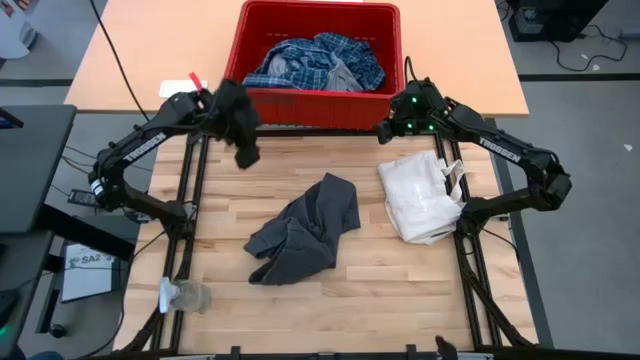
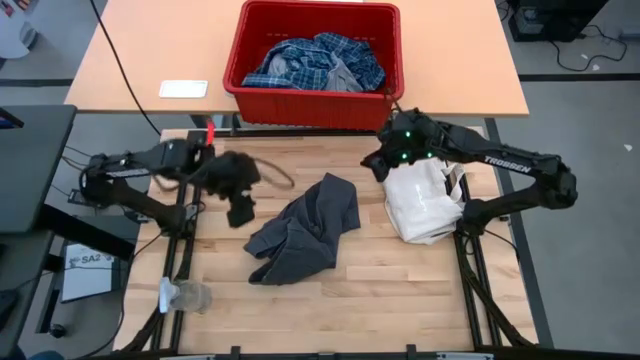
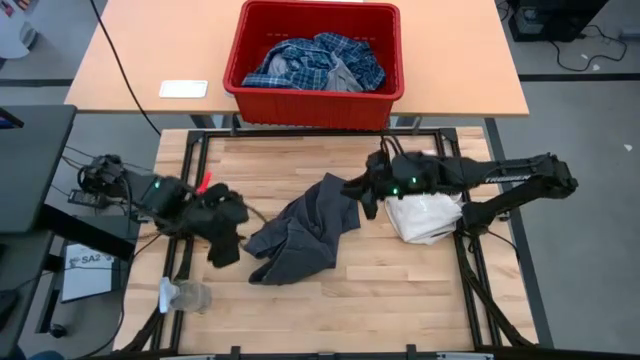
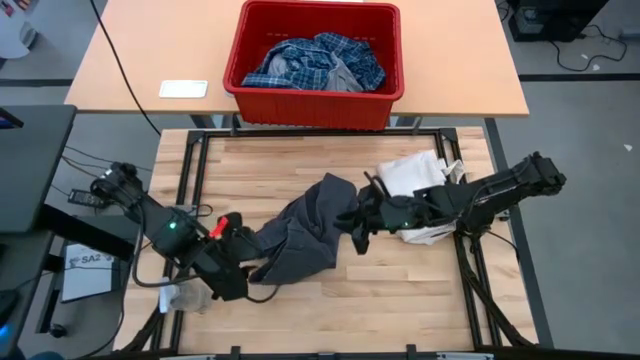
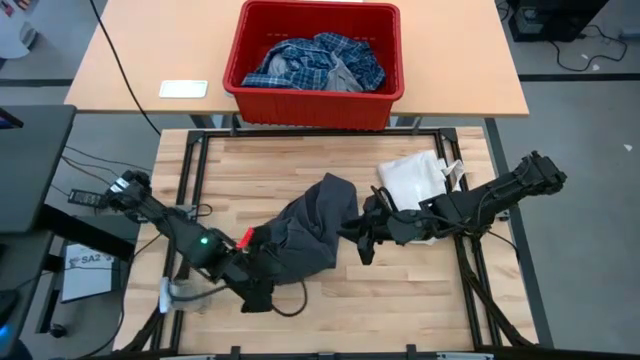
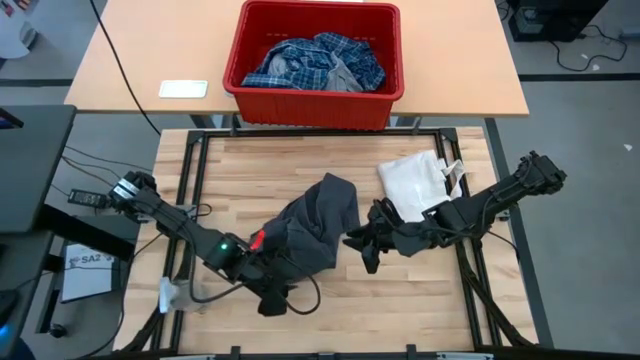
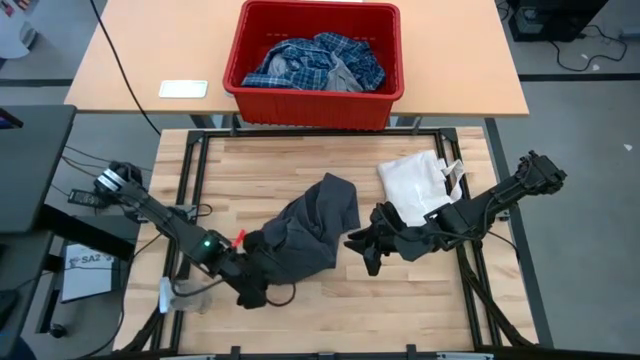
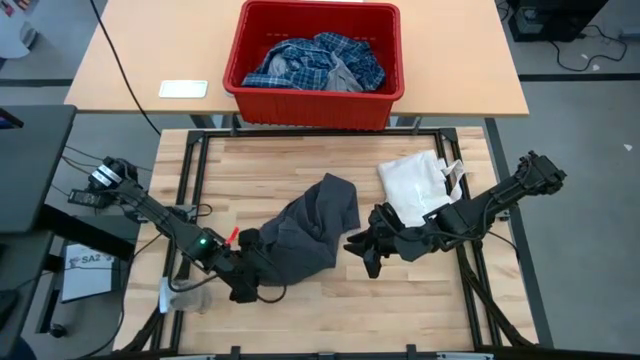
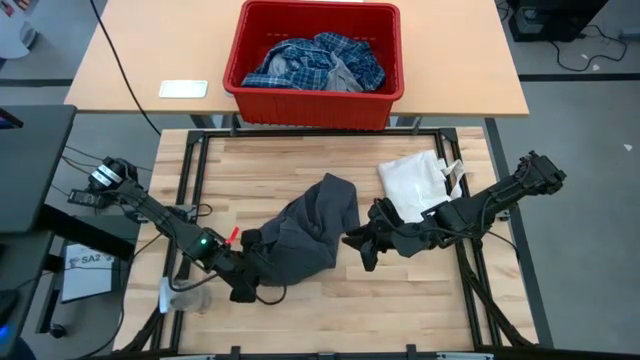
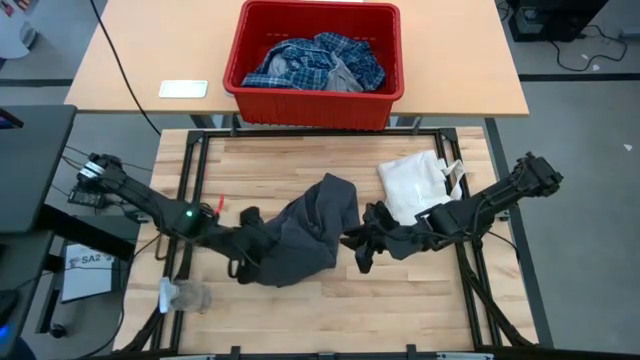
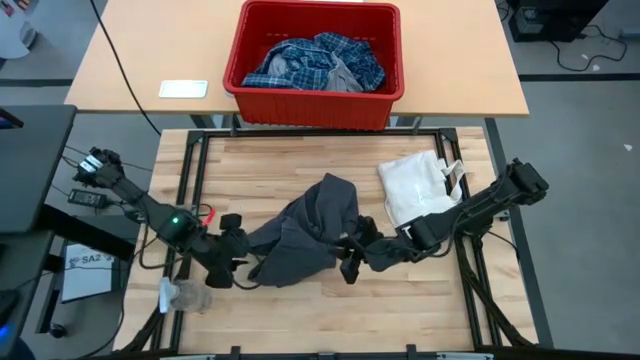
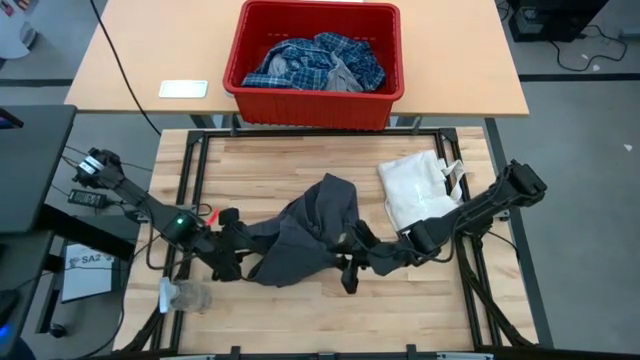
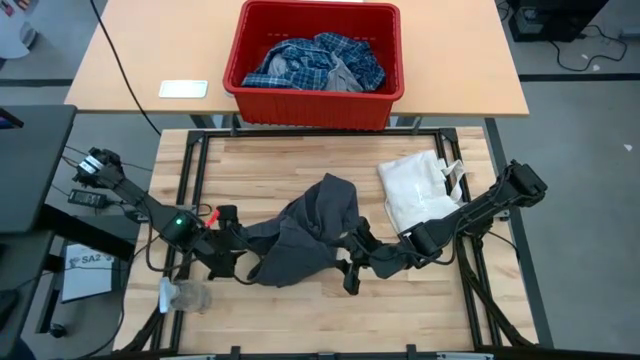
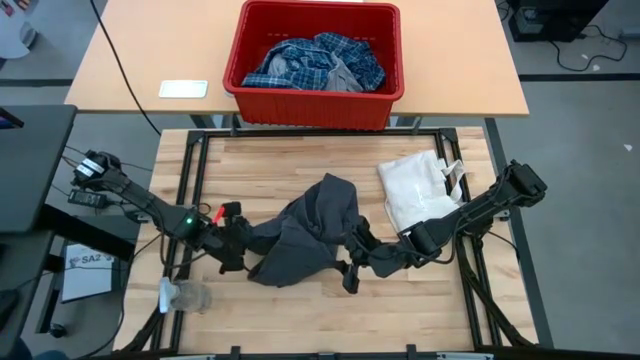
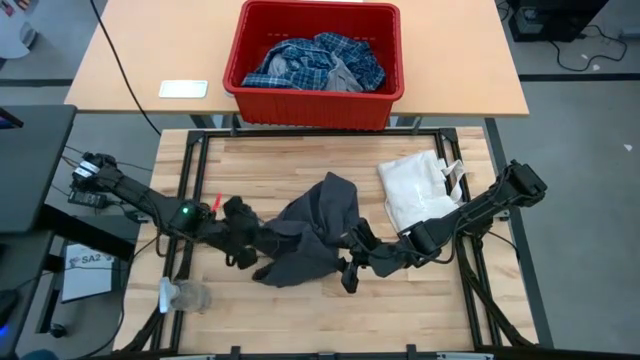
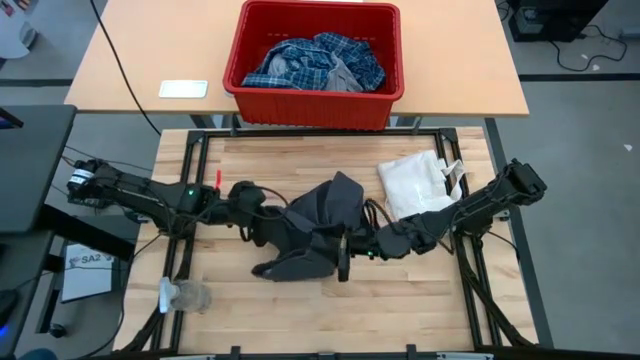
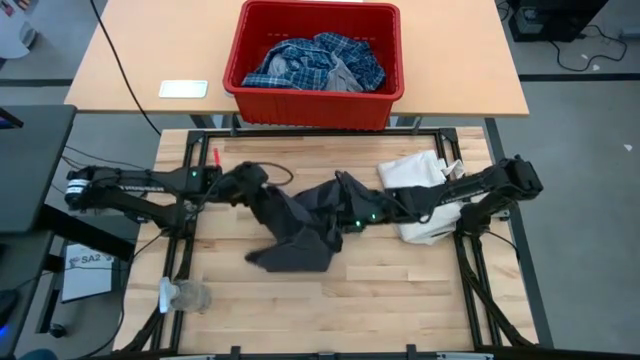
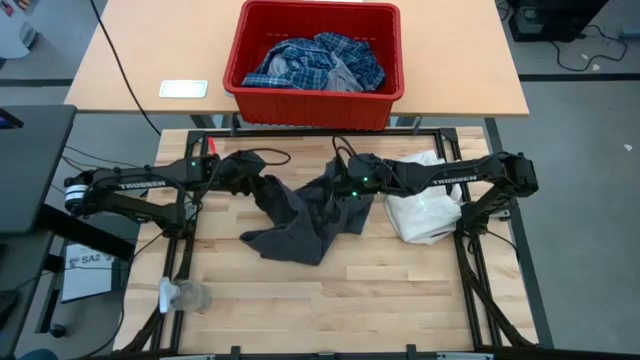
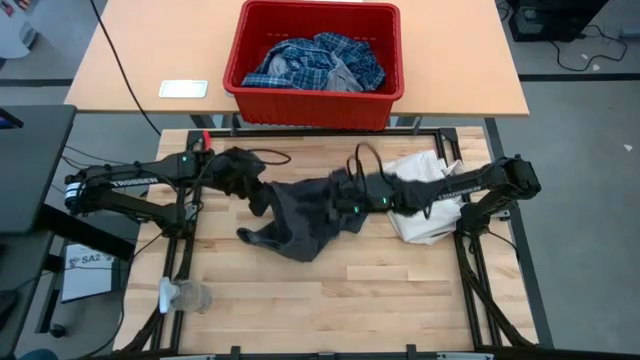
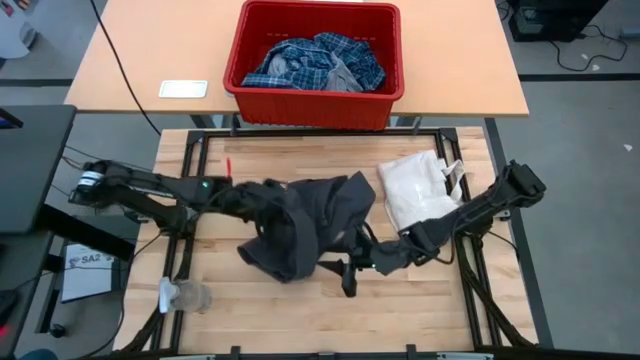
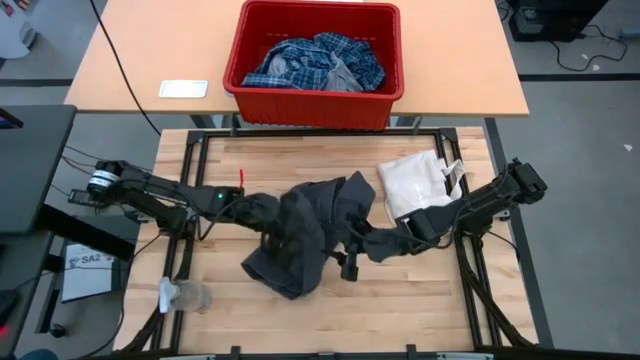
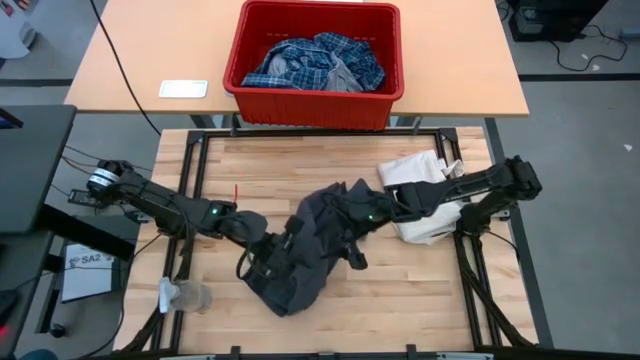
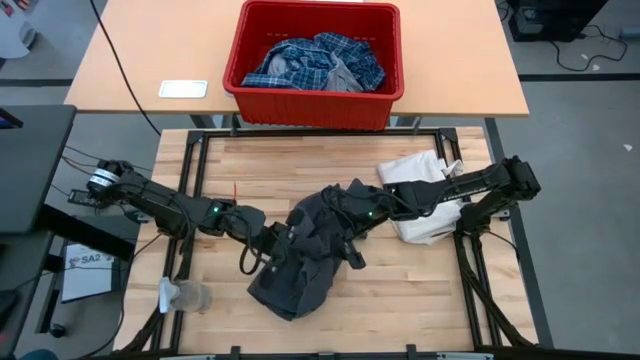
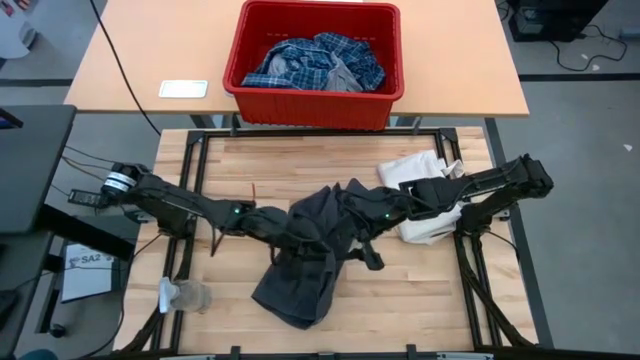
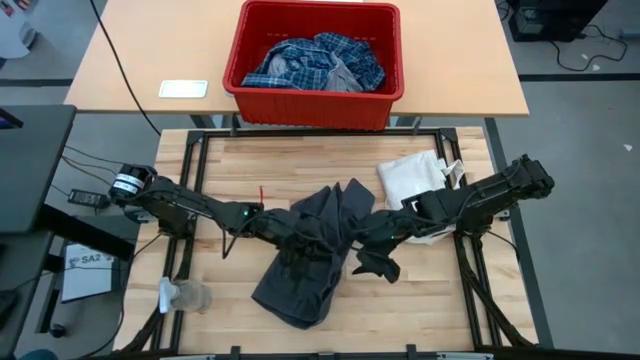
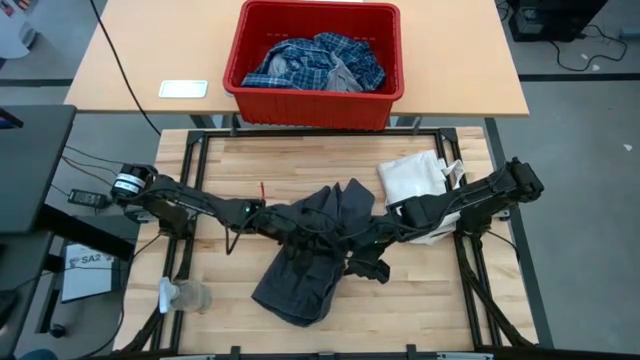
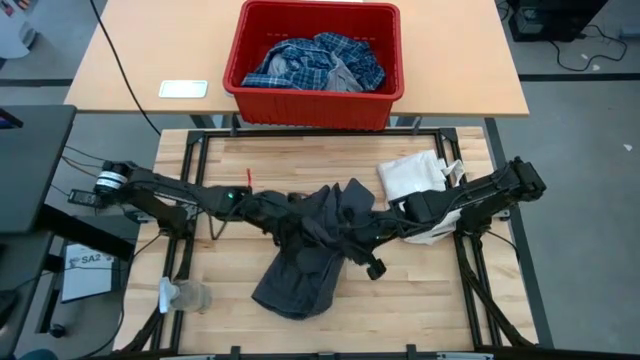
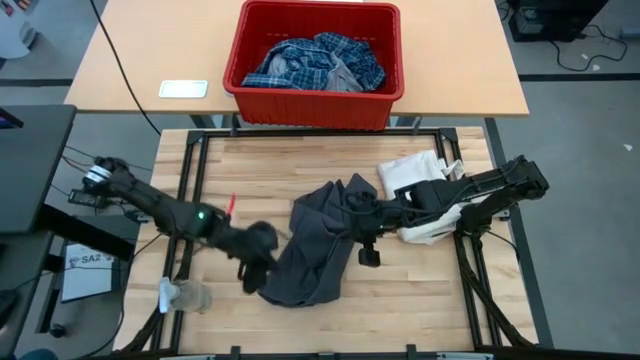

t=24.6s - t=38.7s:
Task: Fold Laundry from Bin
Fold the black shorts

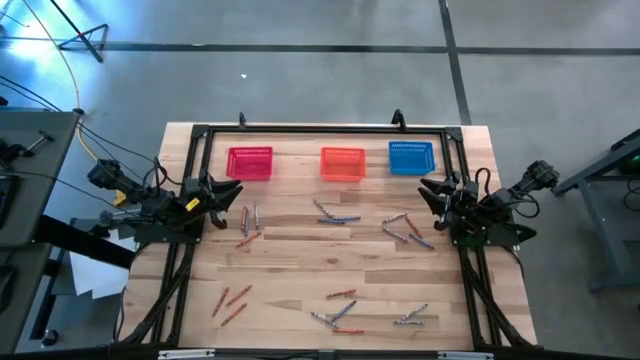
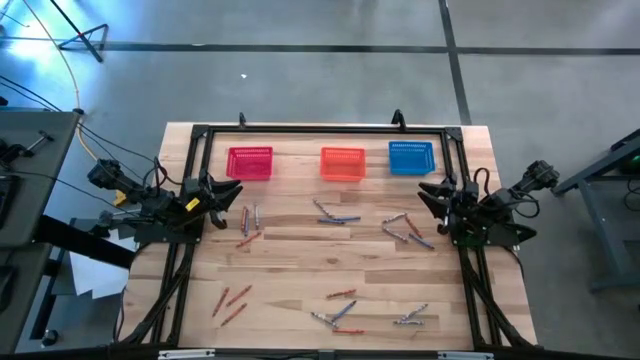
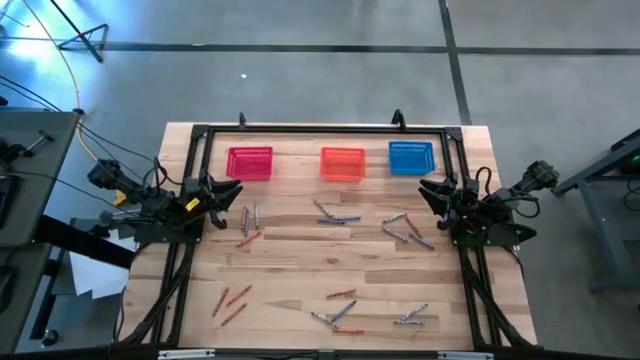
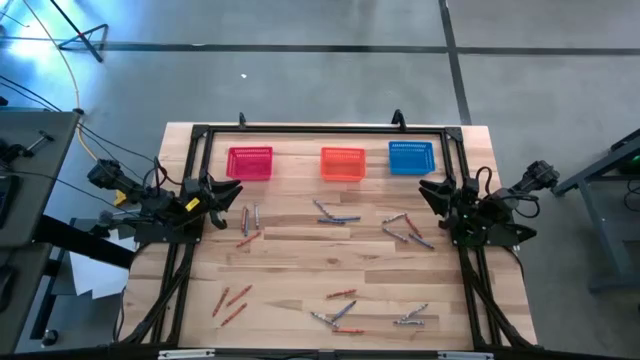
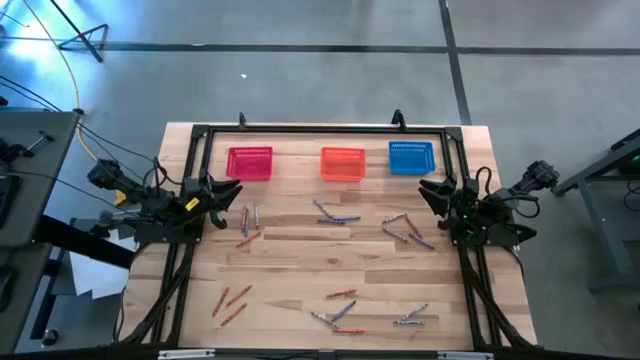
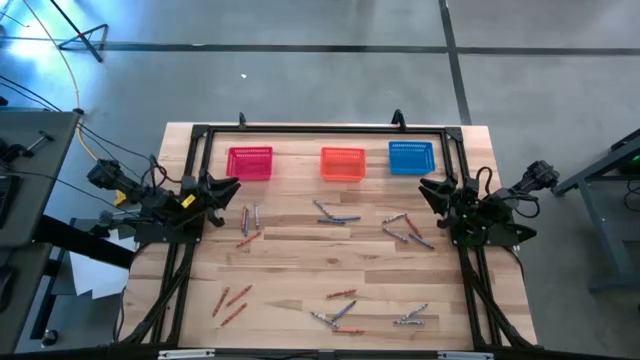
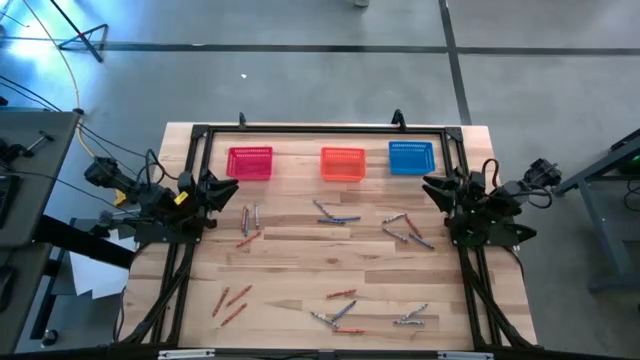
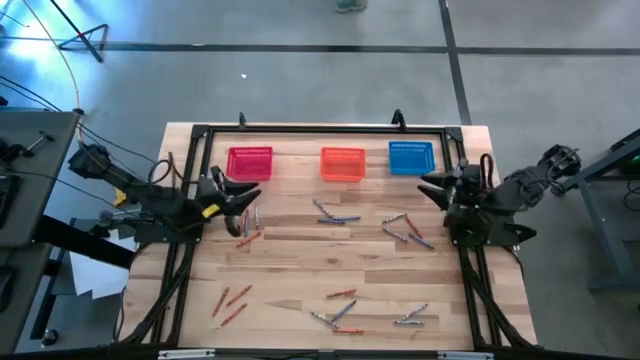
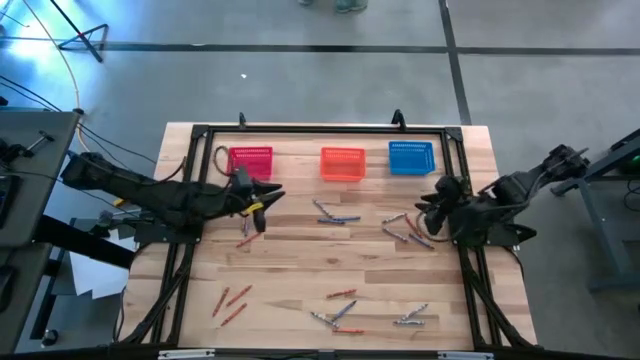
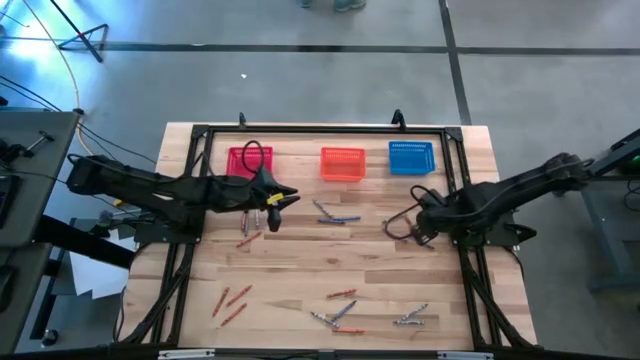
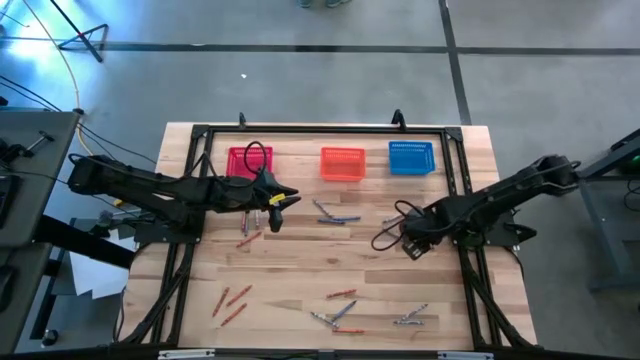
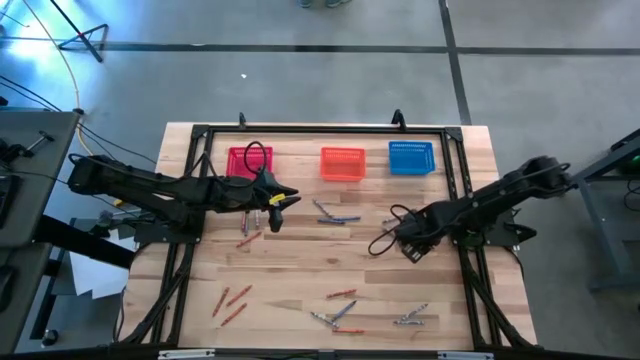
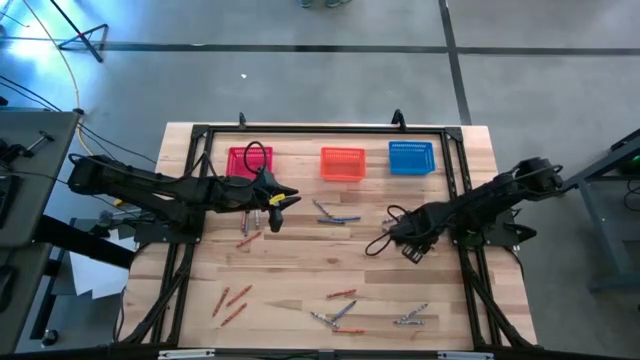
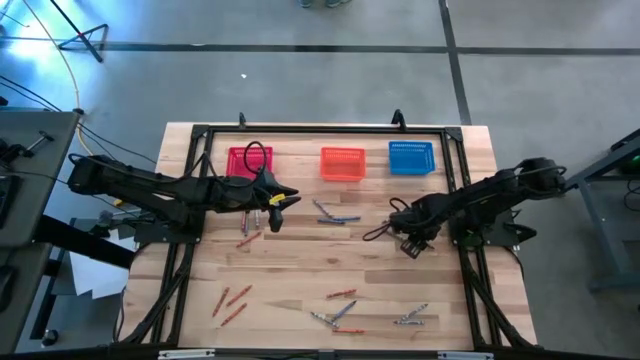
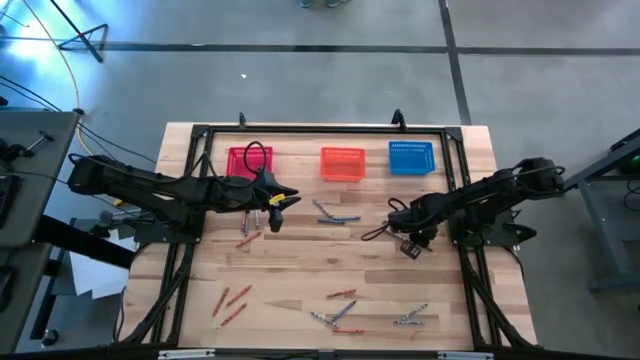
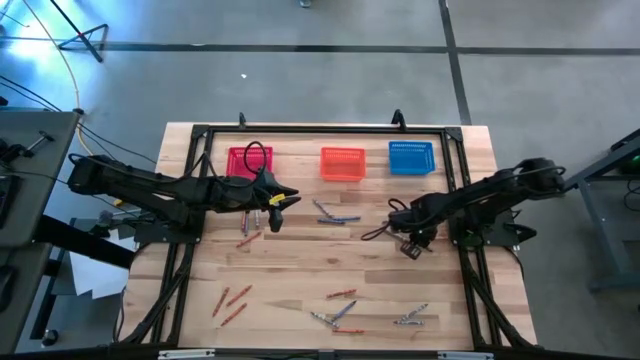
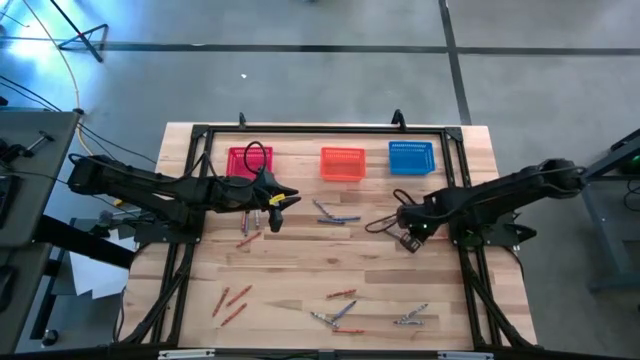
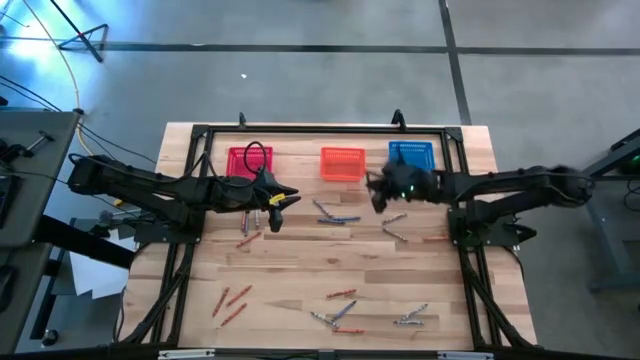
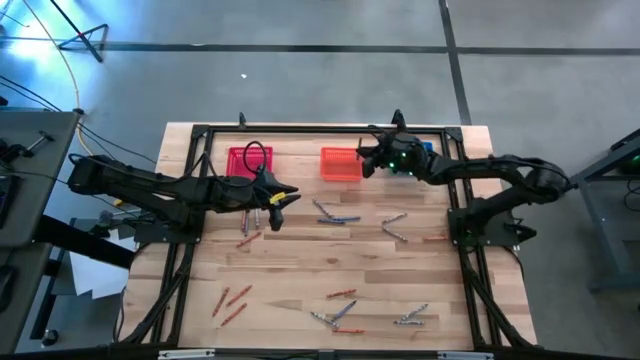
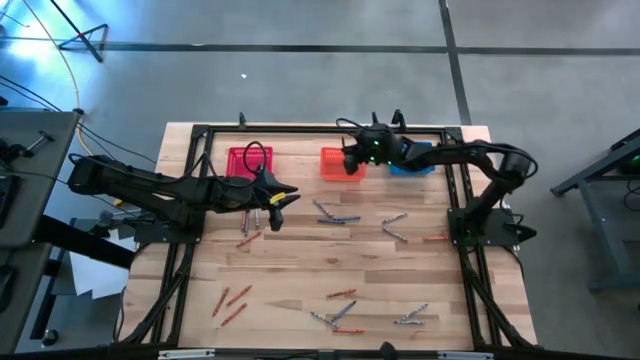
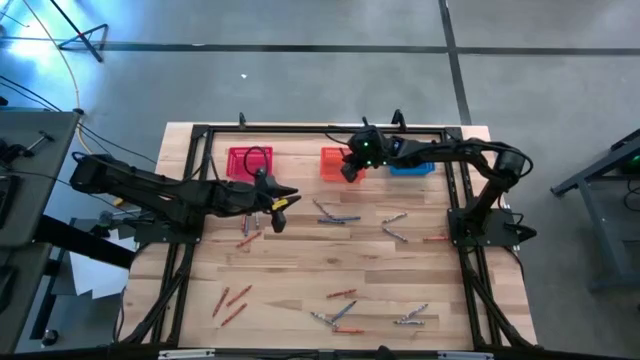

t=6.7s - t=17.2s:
Task: Sort crayons
Put the blue crayon into the orange bin
